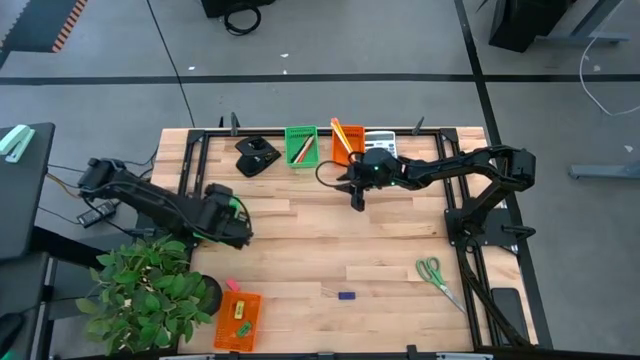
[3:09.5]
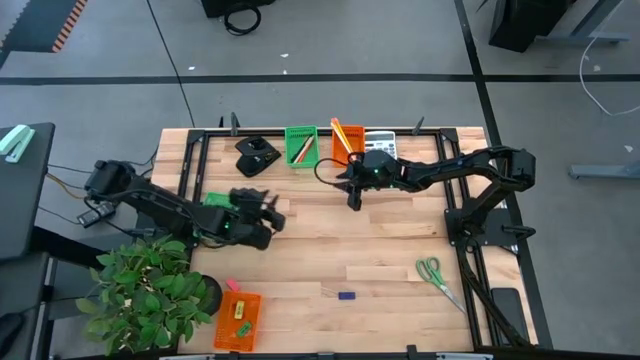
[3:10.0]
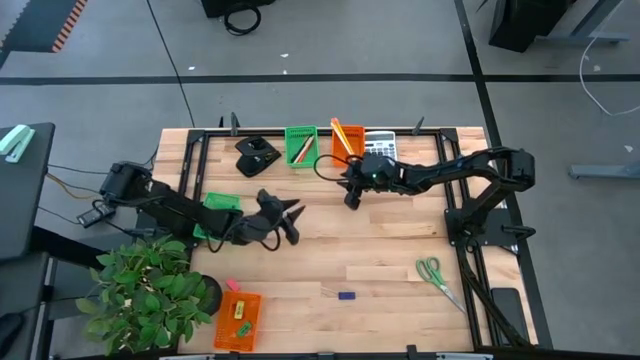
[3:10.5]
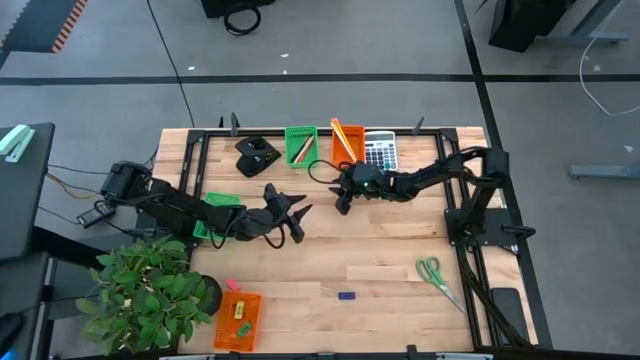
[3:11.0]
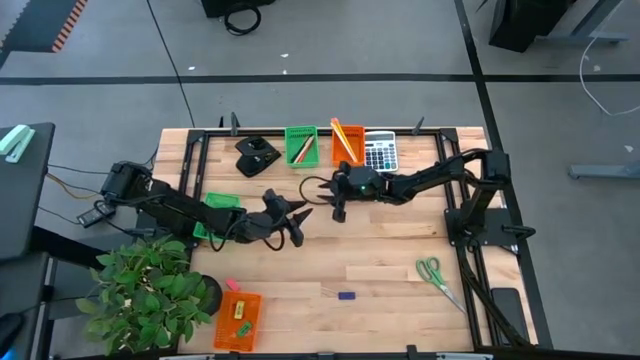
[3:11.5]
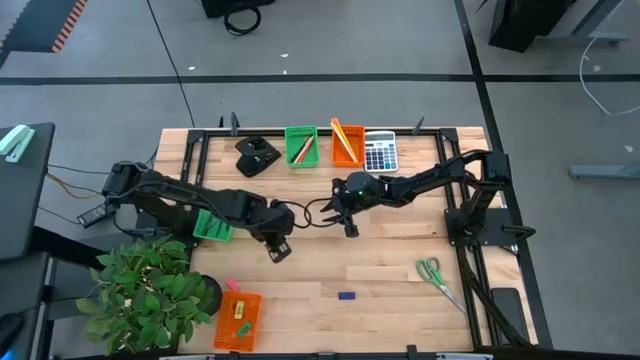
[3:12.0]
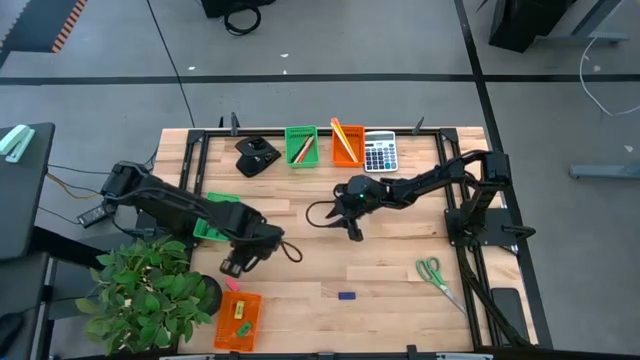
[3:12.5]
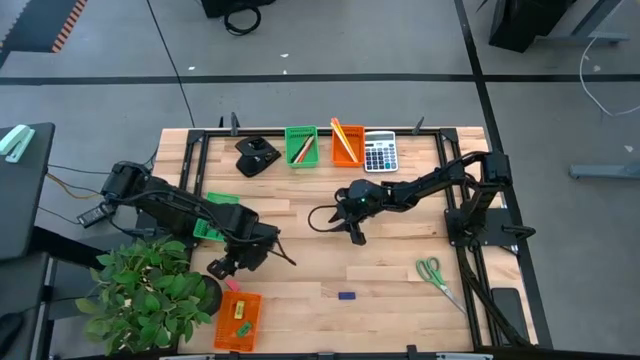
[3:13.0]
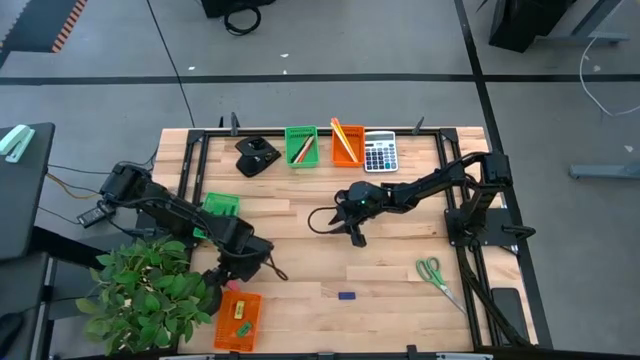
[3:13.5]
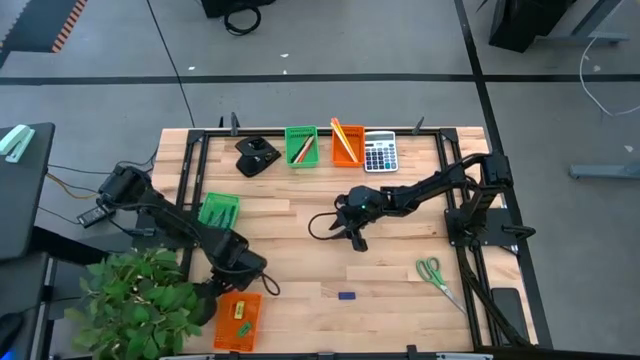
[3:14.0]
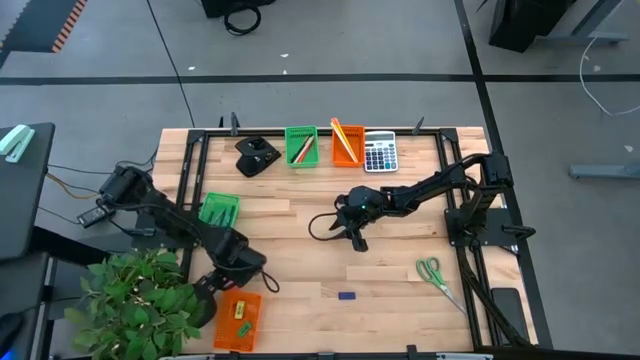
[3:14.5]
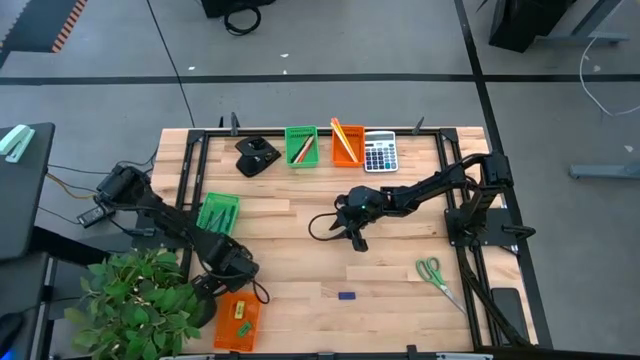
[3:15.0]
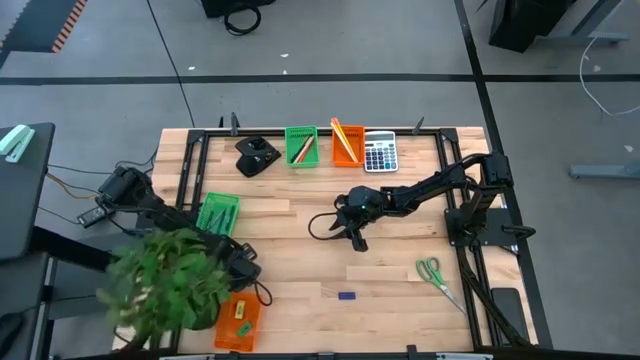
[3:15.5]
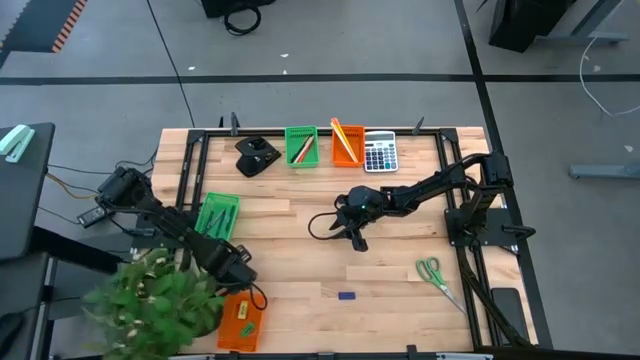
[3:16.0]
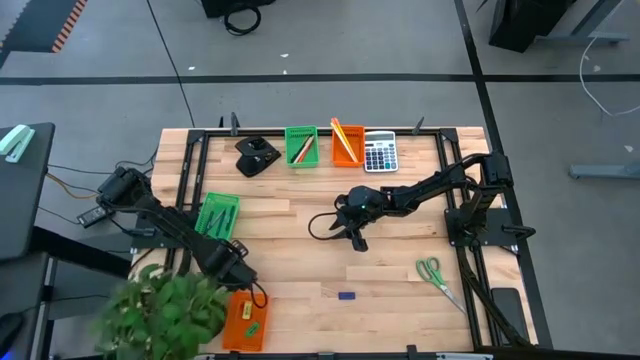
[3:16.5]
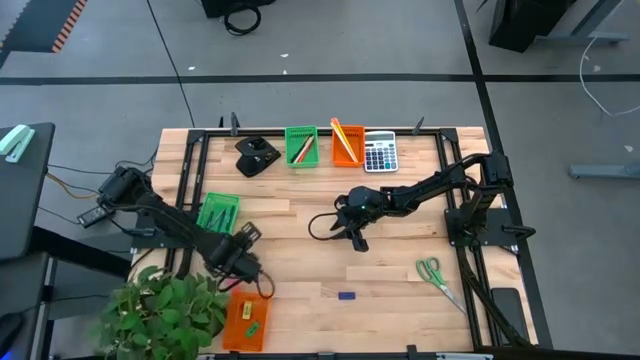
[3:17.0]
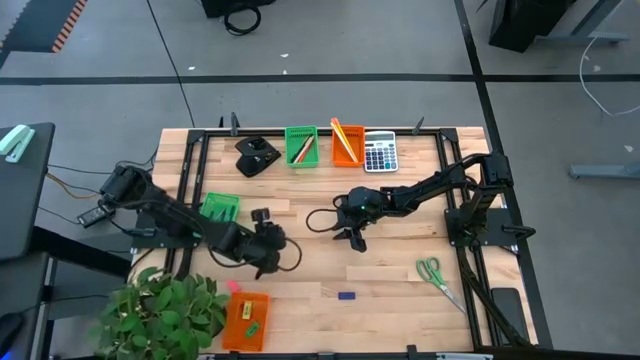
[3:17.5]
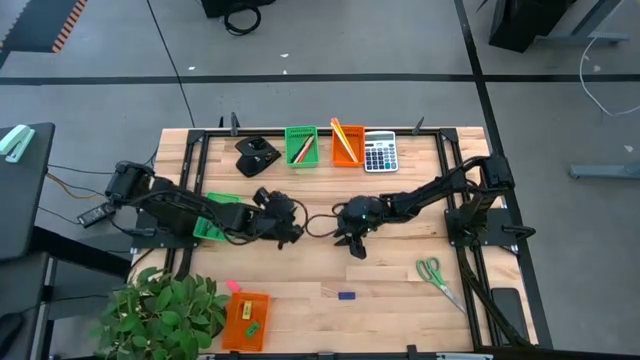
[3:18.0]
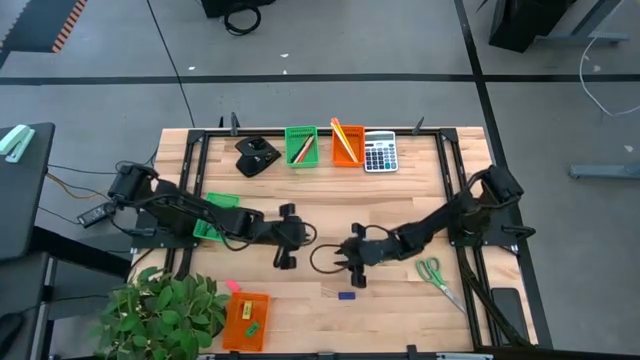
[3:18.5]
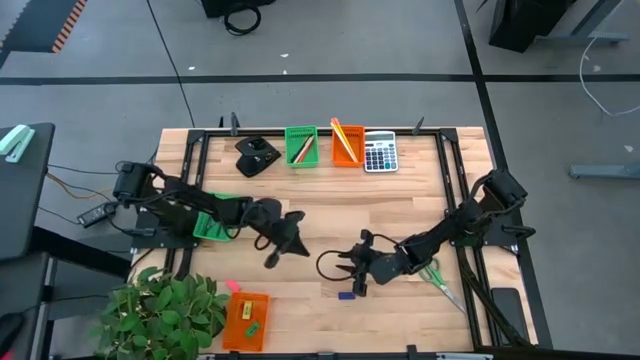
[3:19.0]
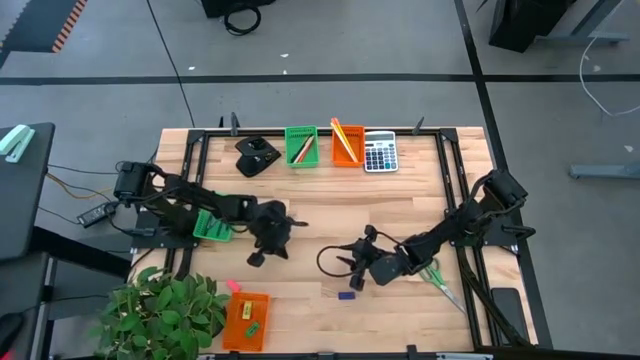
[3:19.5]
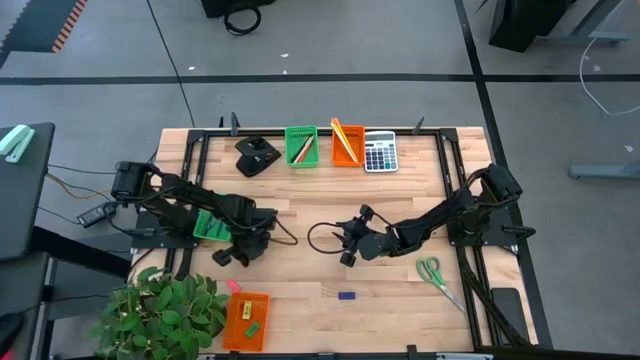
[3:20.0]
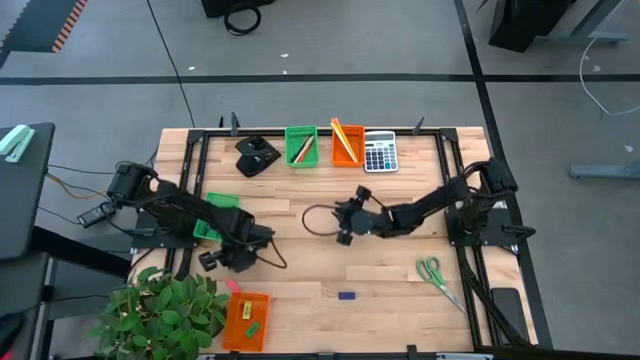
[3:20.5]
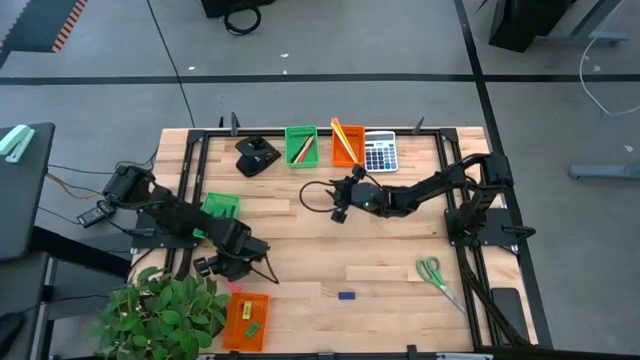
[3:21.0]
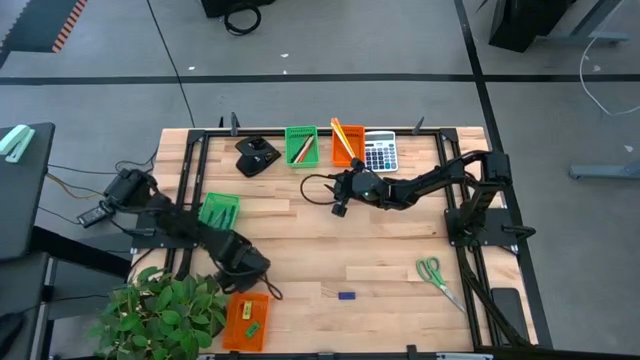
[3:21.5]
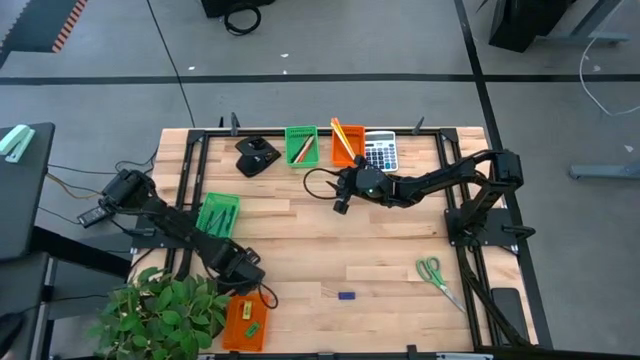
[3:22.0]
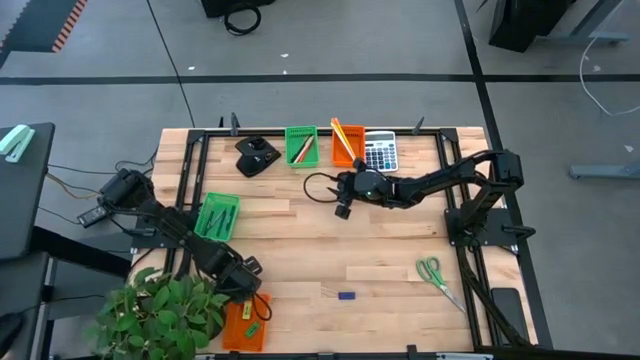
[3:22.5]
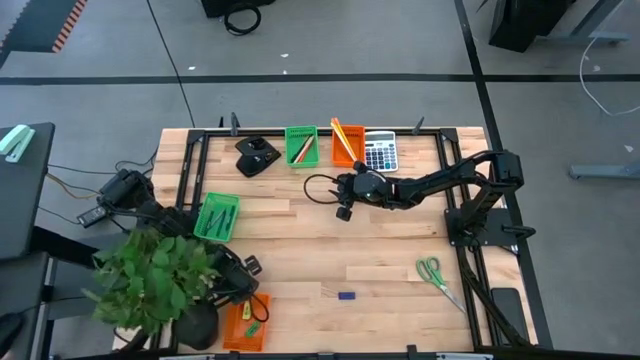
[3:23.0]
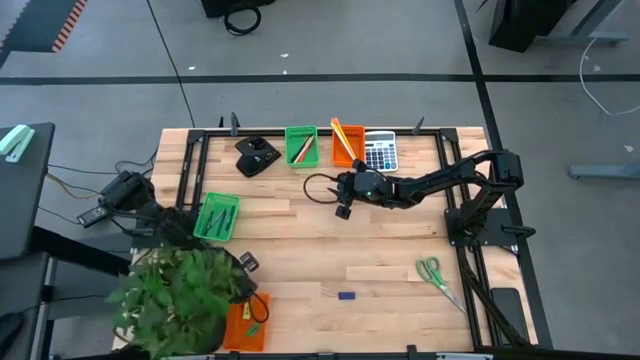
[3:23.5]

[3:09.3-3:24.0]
Task: Sort crayons/erasers/pens/pencils in bins
Put the pink eraser into the bottom orange bin

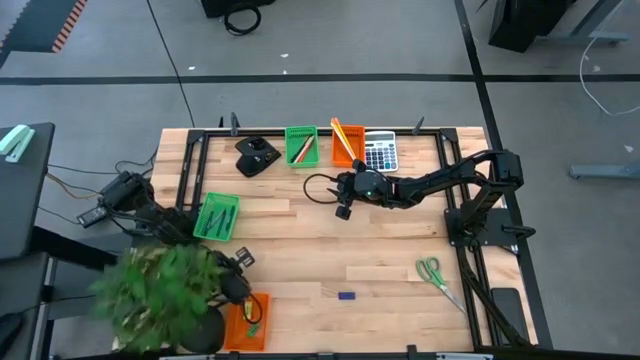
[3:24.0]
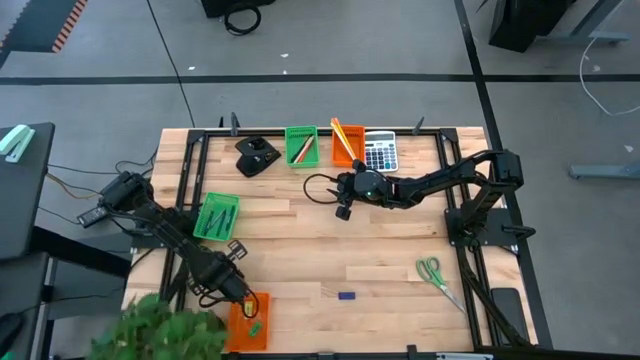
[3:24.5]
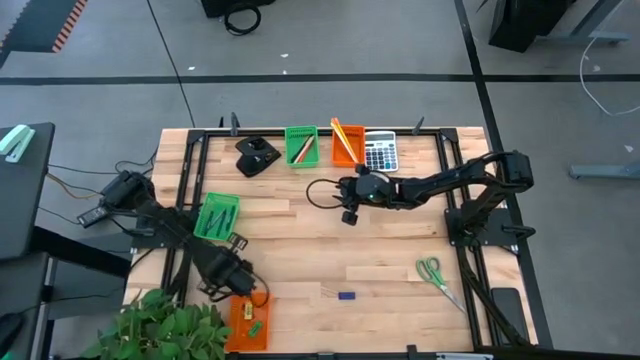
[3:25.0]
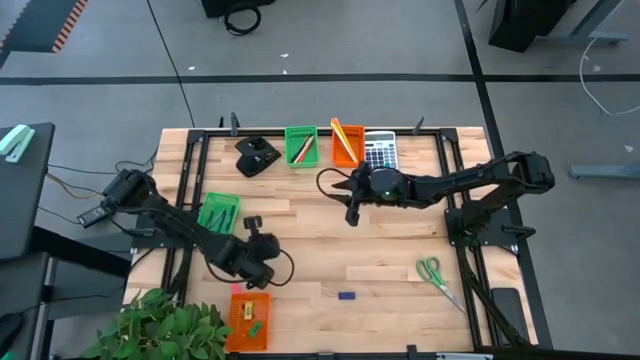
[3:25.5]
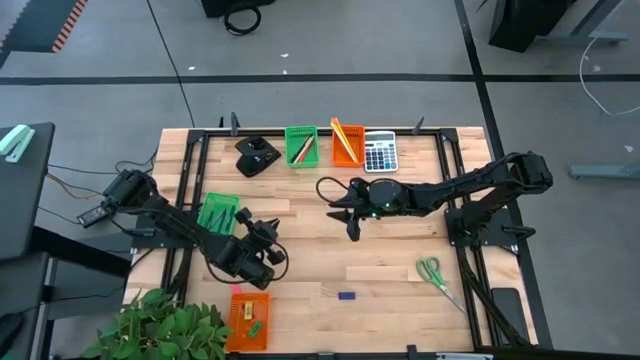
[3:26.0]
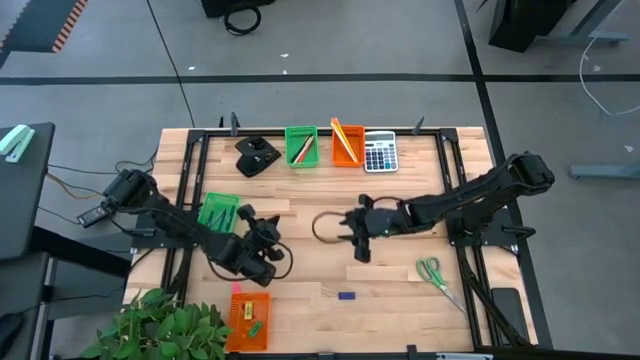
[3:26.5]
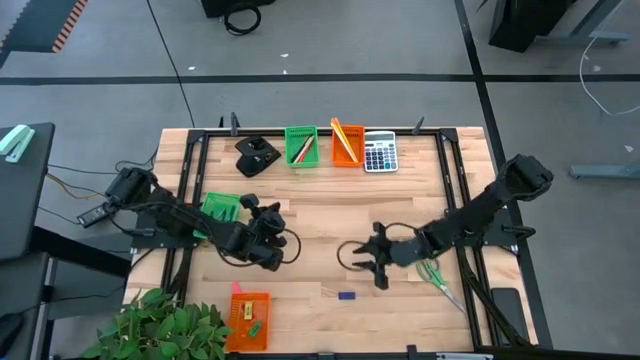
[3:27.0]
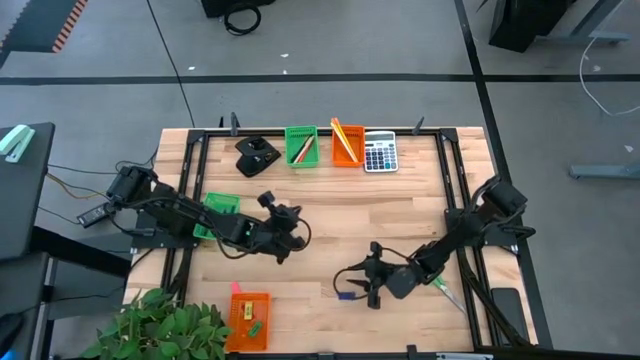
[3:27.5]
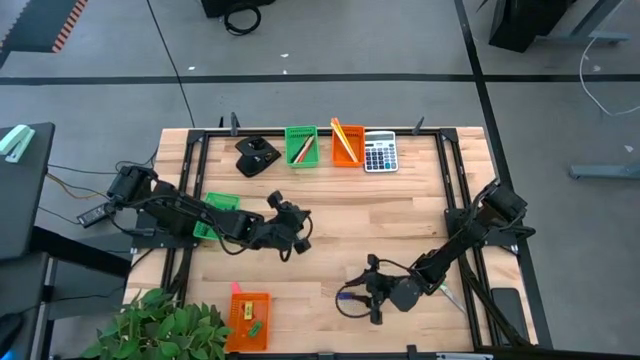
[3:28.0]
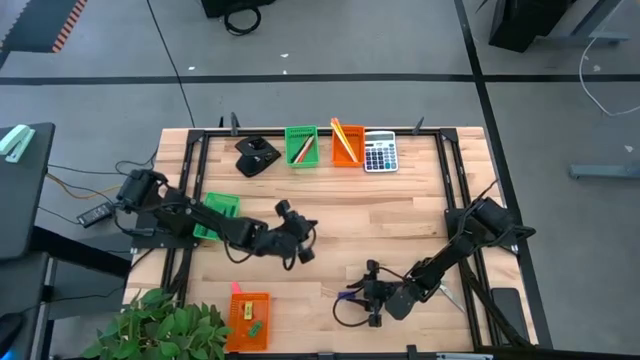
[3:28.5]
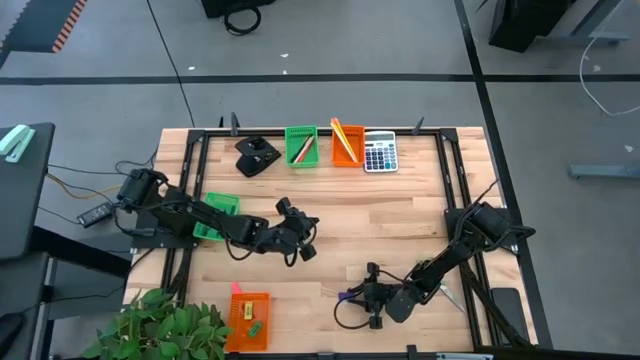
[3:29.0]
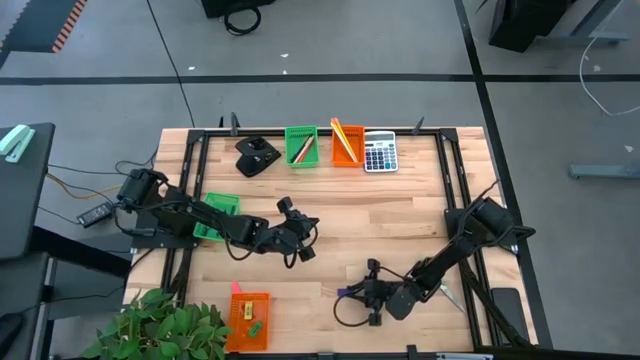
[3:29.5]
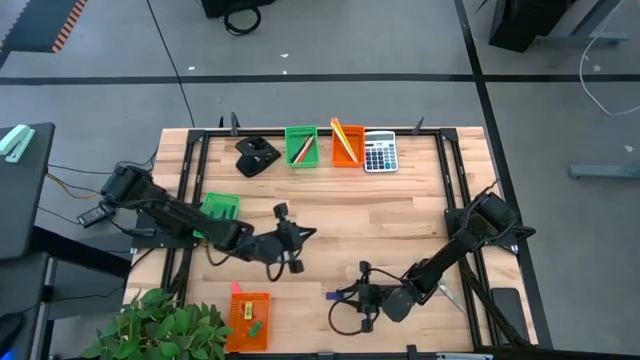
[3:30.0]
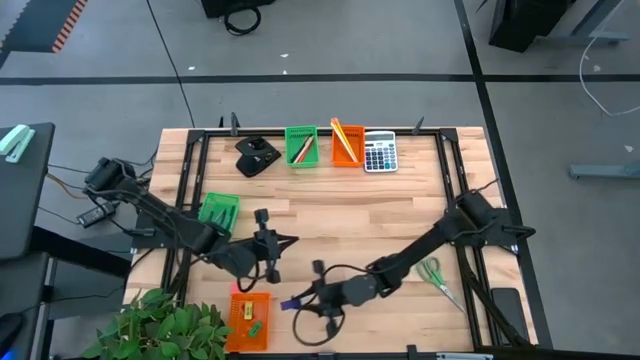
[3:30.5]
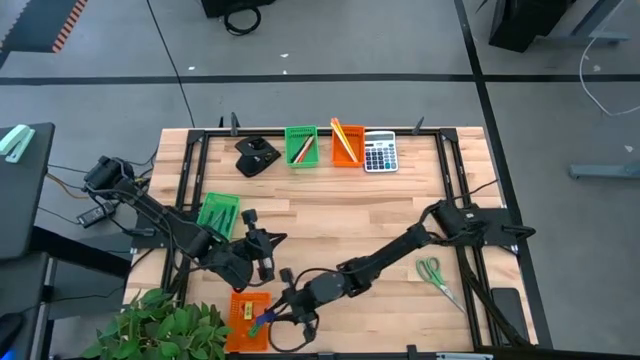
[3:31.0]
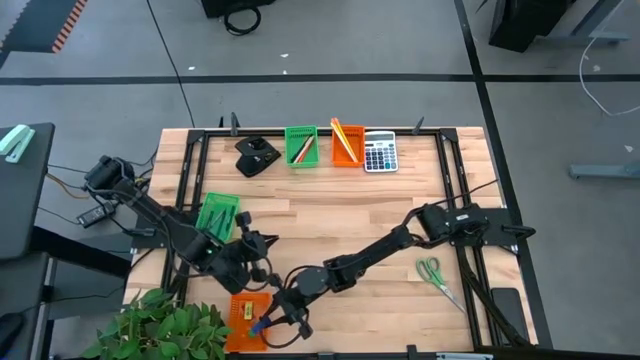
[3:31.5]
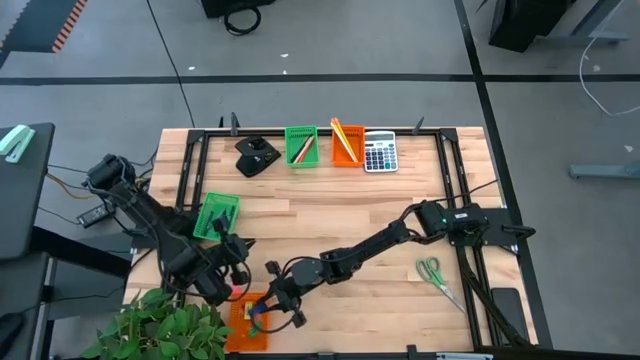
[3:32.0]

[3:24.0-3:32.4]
Put the blue eraser into the bottom orange bin
